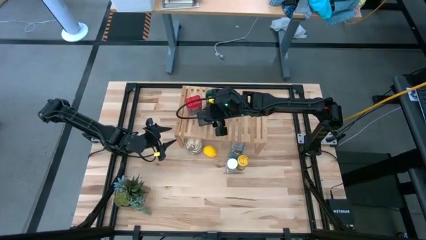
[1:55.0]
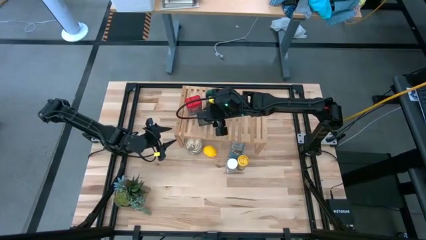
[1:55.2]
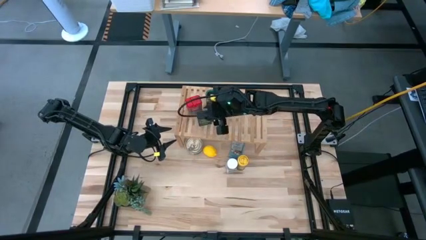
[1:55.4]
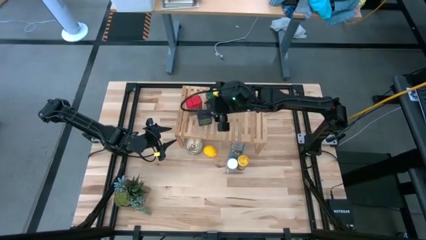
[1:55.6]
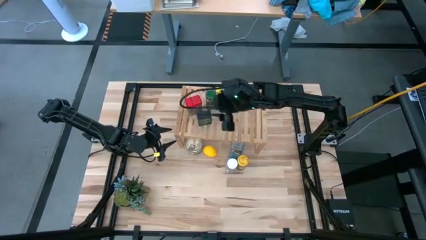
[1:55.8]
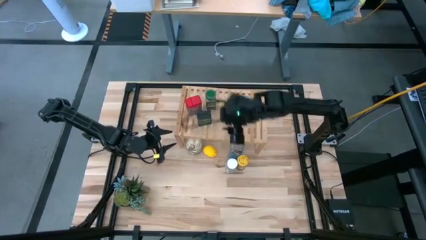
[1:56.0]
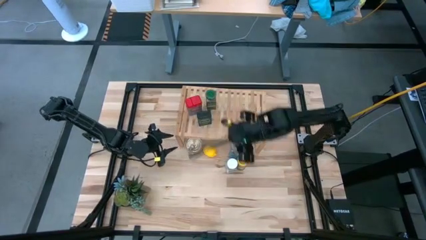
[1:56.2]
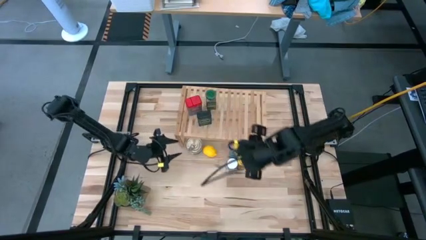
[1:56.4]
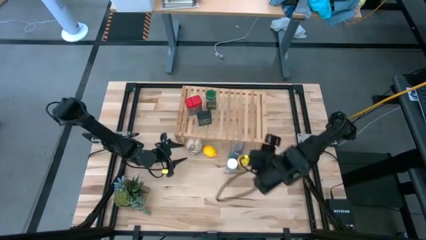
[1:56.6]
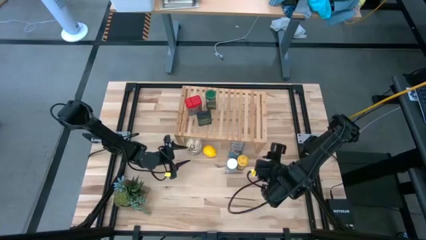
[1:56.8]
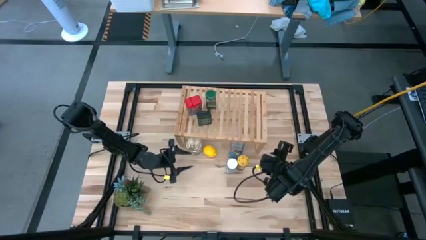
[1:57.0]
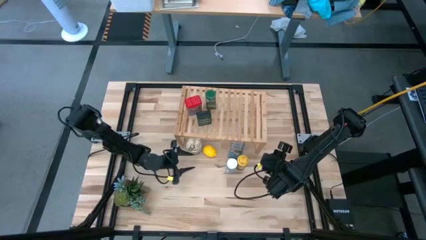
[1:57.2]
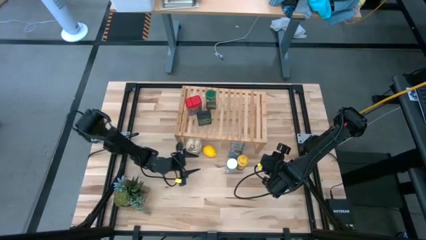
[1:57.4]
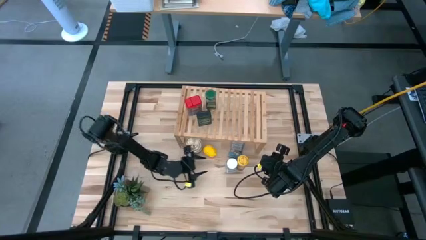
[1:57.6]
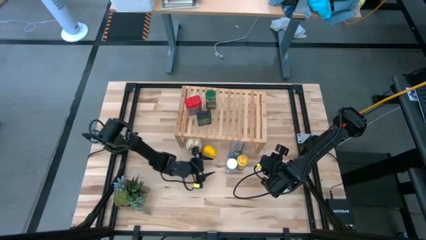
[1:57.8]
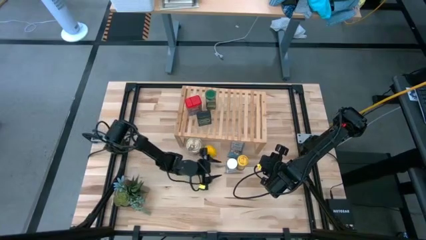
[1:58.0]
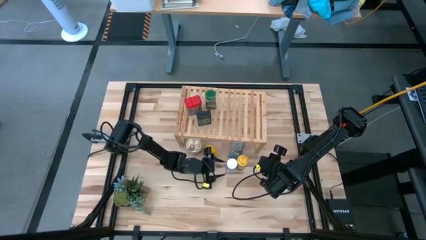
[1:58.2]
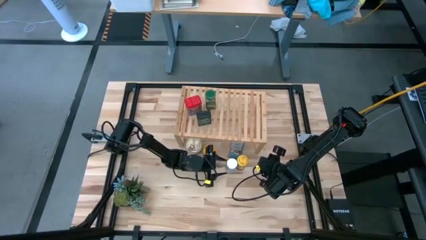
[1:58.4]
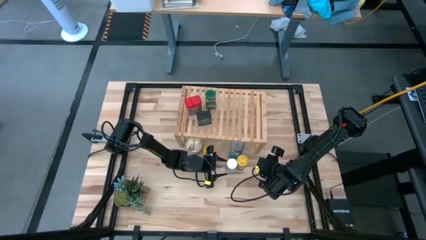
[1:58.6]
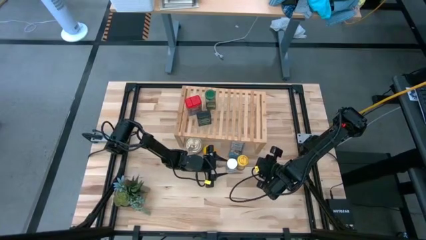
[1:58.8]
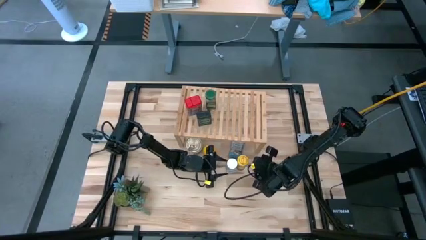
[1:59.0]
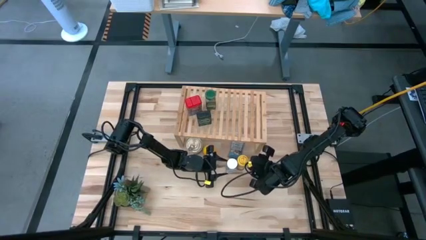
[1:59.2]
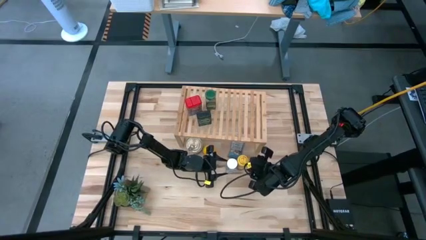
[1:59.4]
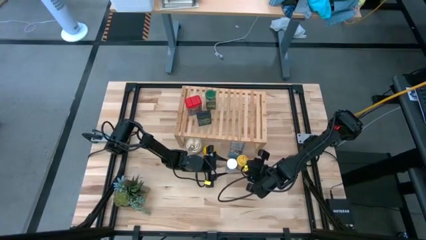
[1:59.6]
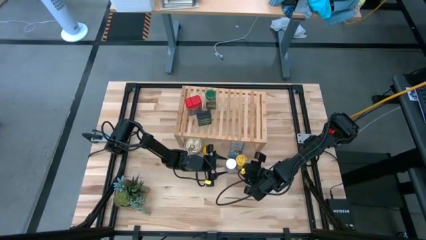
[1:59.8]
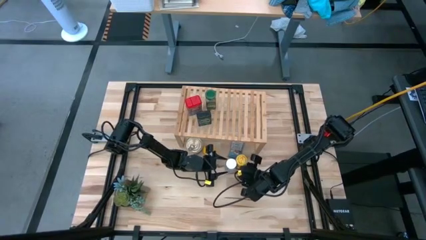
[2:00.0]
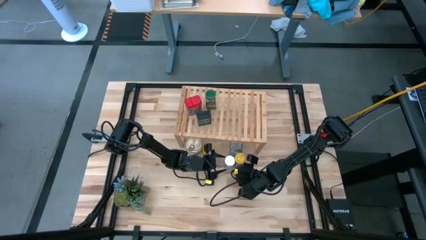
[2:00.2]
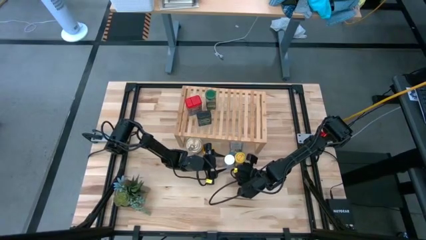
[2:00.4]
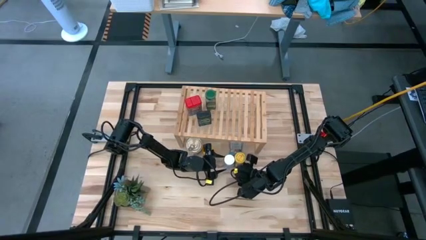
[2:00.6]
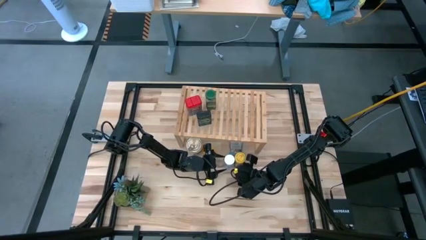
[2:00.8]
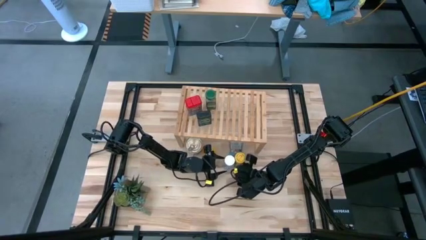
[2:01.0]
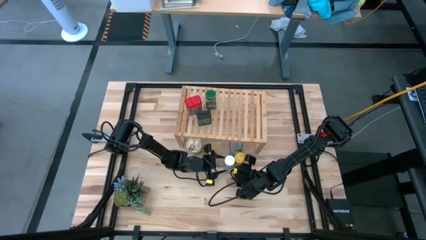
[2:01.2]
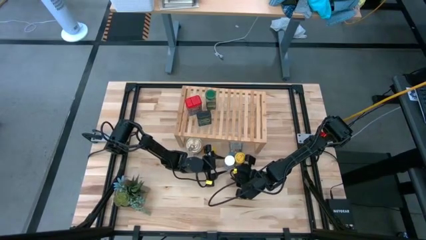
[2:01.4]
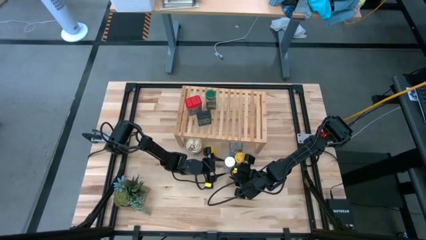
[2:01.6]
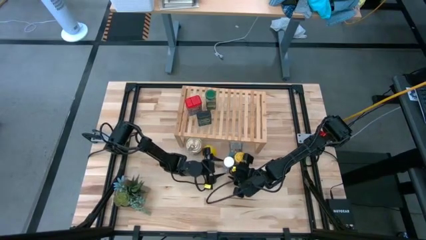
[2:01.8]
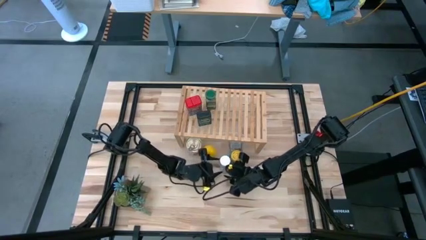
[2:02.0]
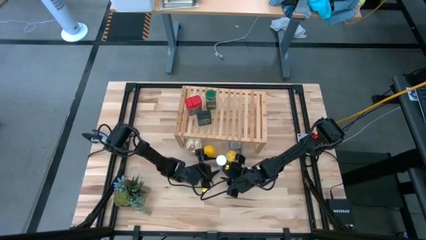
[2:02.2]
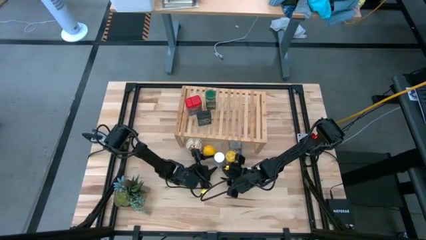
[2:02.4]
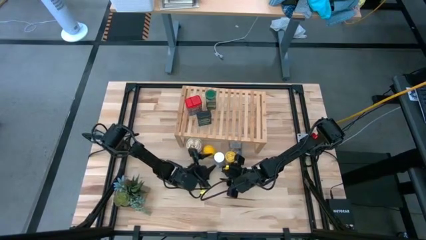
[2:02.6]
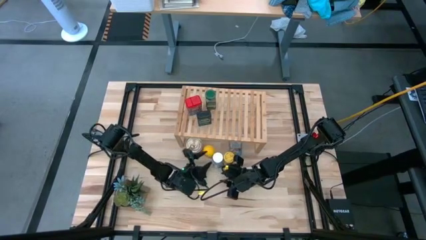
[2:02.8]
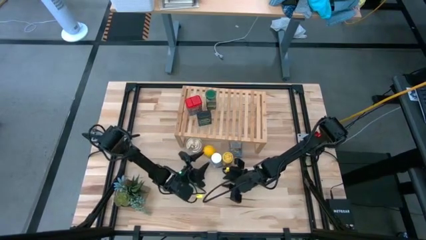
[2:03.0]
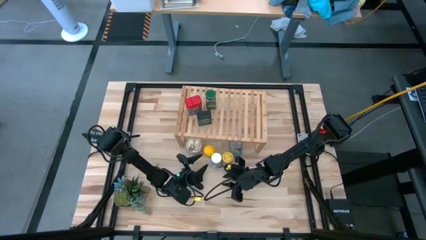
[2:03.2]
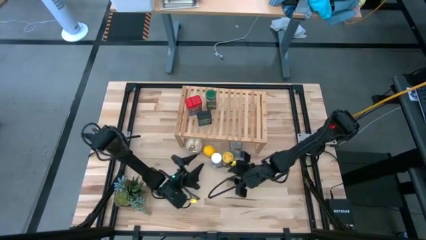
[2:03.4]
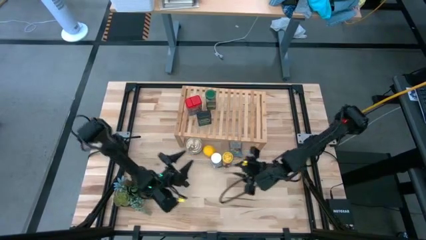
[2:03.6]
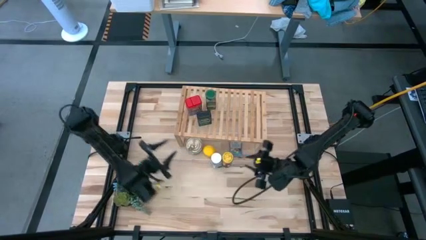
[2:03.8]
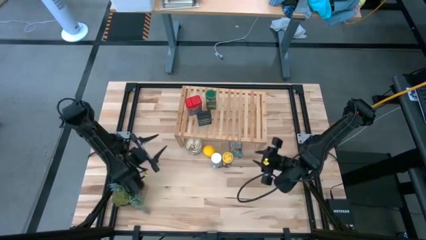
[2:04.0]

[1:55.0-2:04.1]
Task: Shelf spices
Adjust the seasoning bottles

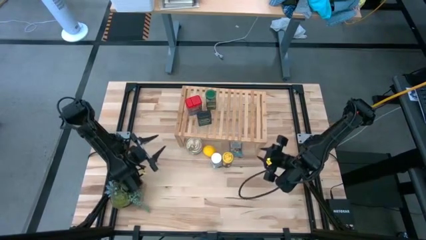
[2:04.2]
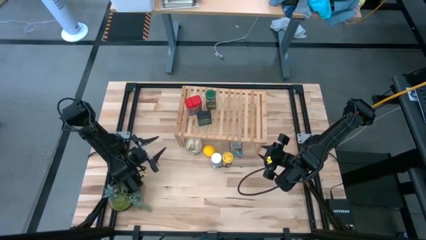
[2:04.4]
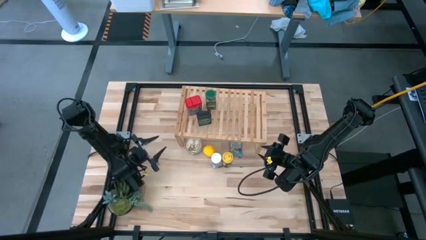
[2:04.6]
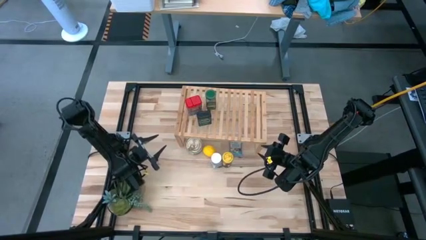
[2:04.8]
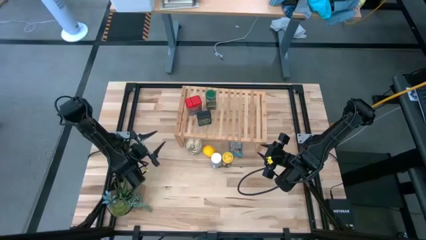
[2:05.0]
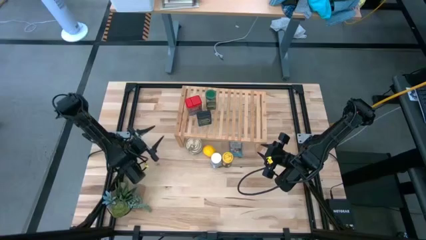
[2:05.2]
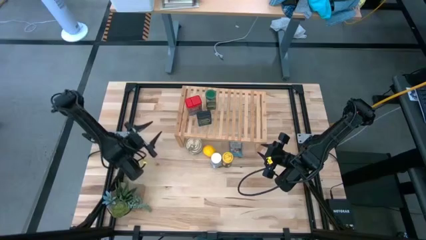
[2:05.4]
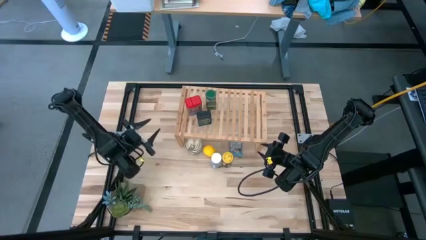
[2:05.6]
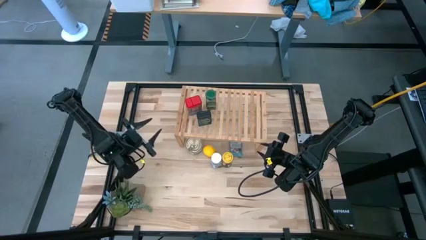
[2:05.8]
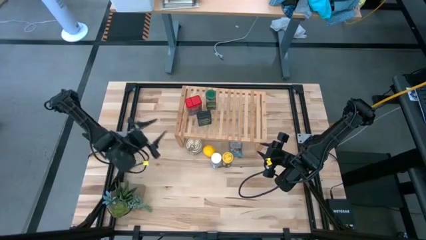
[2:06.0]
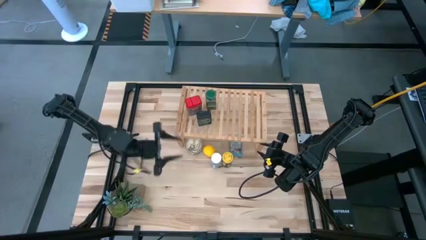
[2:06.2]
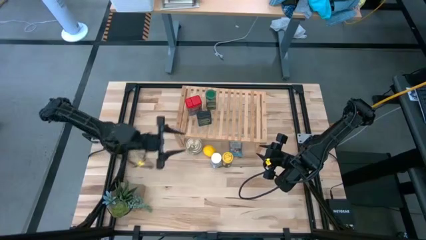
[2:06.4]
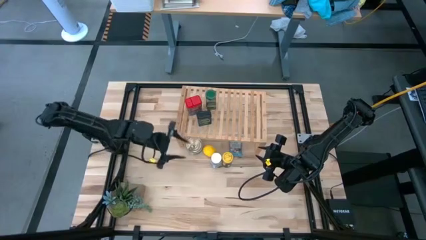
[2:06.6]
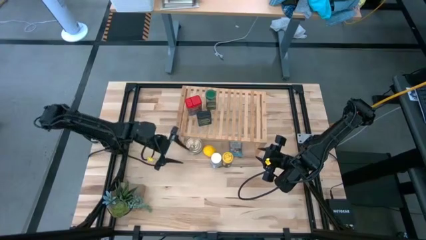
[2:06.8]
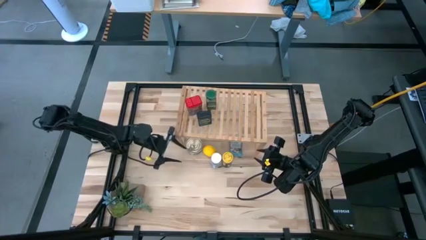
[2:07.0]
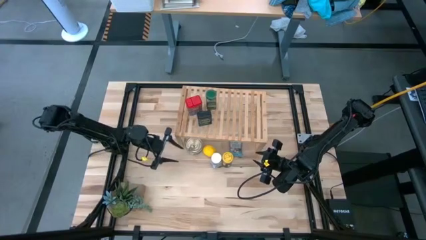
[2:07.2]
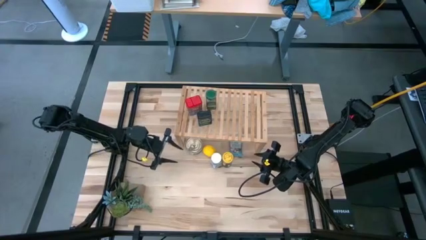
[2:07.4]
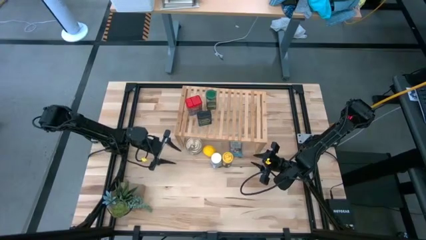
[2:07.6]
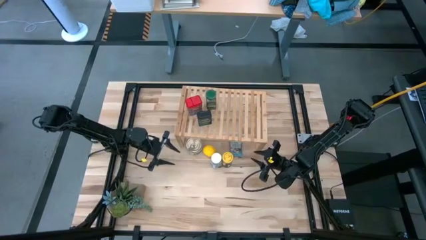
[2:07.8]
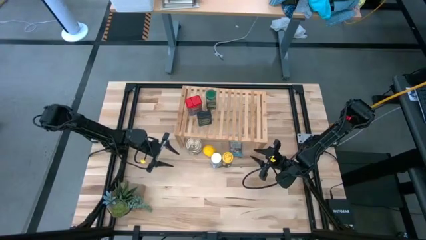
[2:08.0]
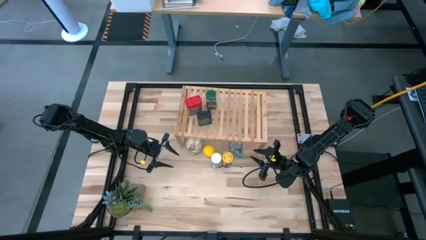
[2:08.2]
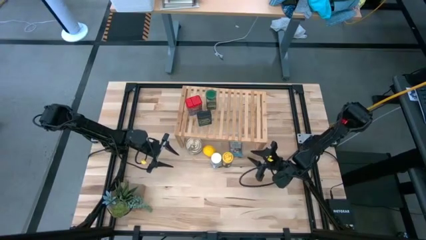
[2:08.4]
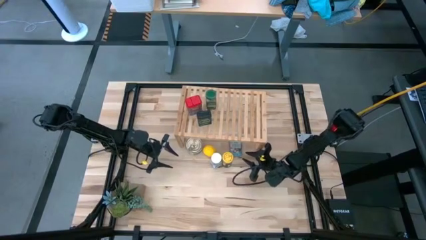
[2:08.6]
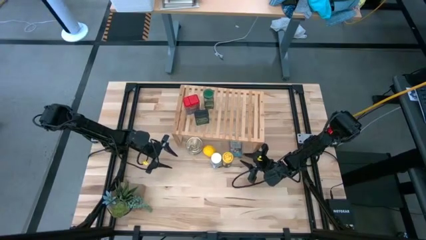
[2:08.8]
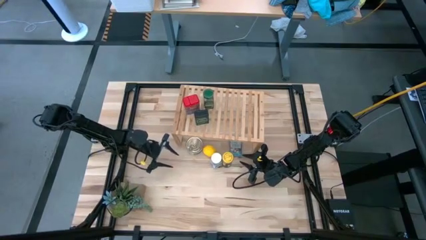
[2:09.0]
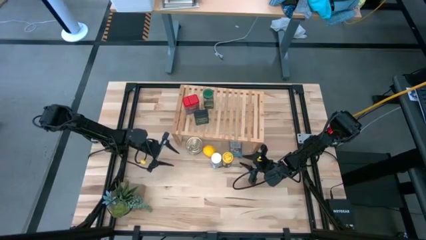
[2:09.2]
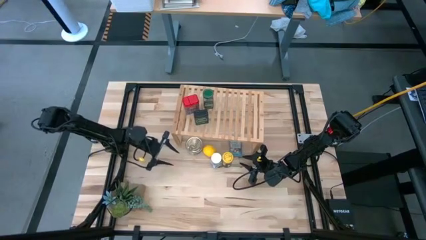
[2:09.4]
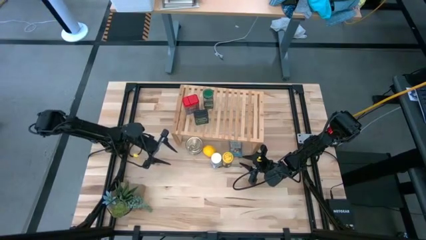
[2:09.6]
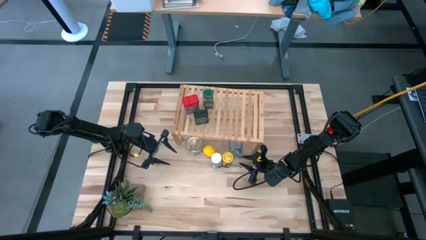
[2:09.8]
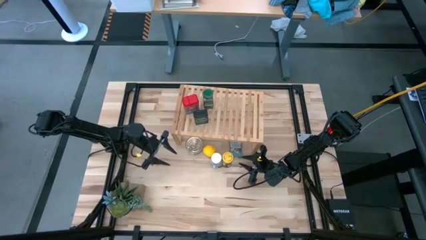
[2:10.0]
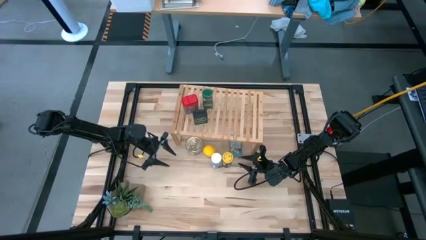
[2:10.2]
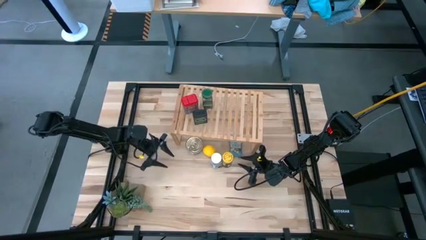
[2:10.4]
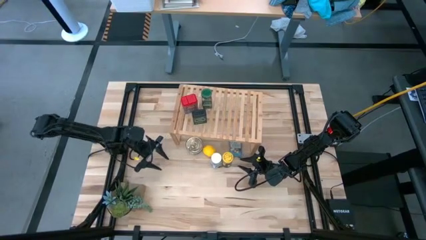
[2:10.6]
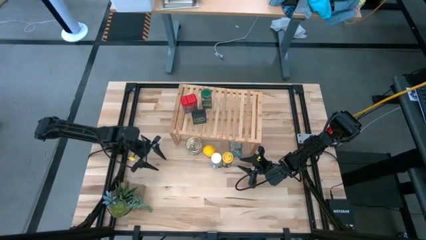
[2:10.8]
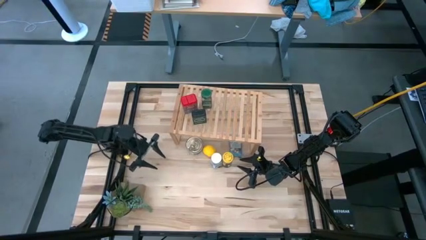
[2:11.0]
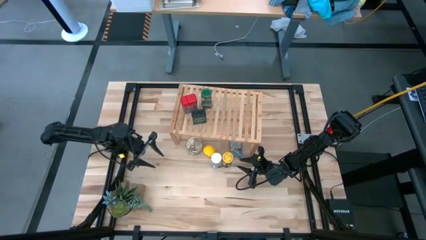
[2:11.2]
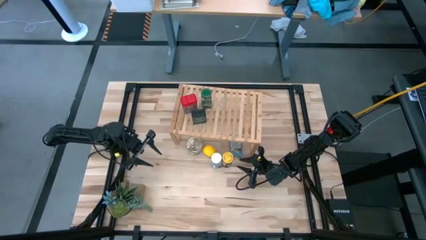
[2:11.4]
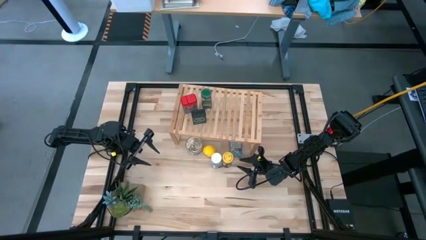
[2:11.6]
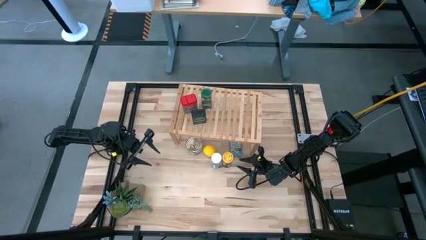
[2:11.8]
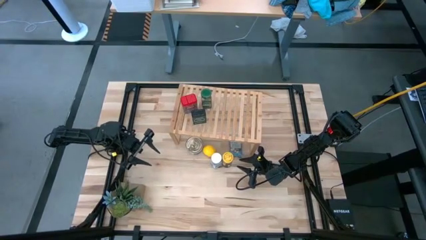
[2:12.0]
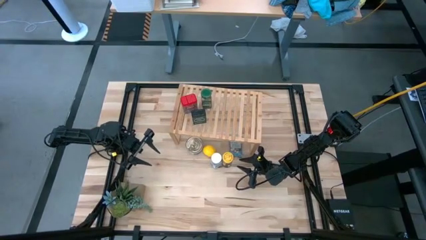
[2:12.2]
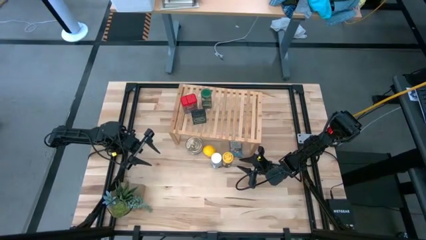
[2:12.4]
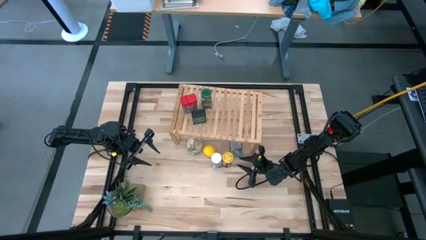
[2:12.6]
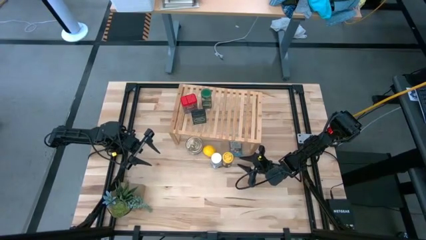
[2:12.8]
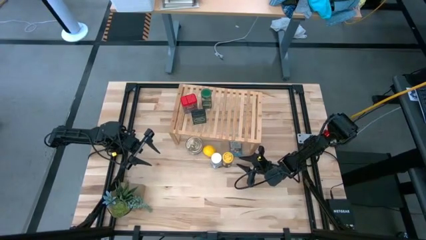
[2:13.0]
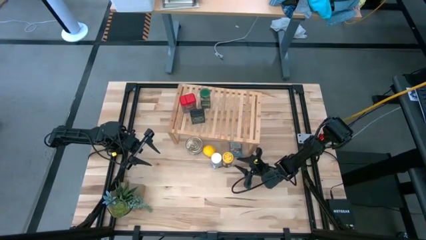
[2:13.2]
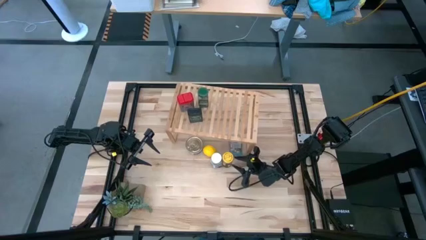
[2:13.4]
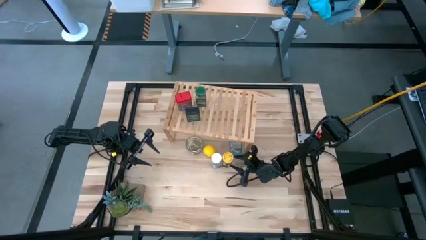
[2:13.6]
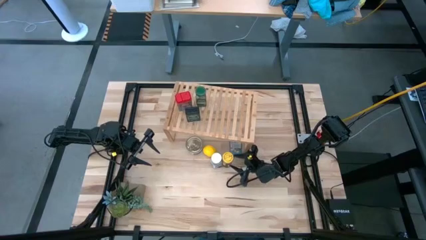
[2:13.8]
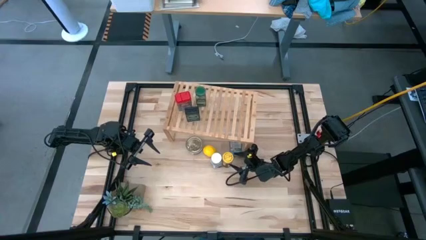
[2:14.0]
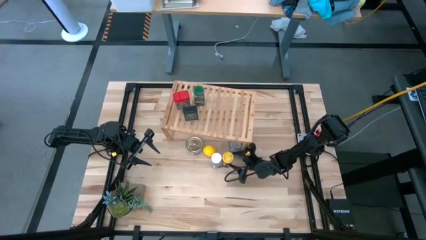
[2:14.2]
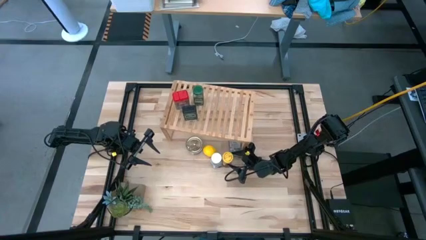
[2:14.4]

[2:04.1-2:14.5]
Put the yellow seasoning bottle on the shelf
